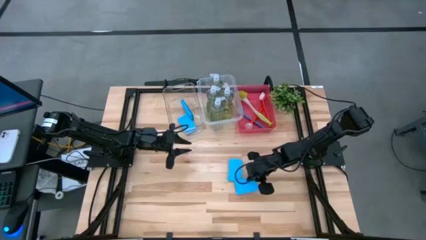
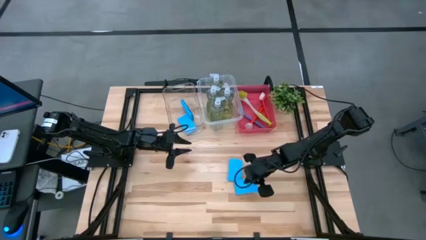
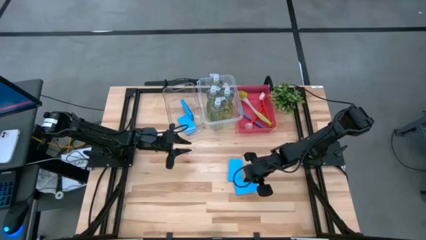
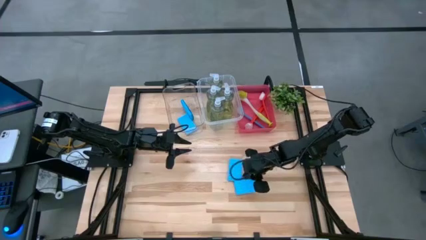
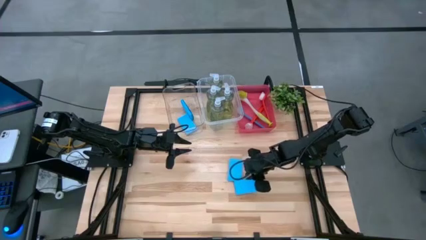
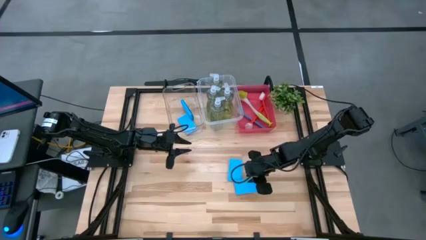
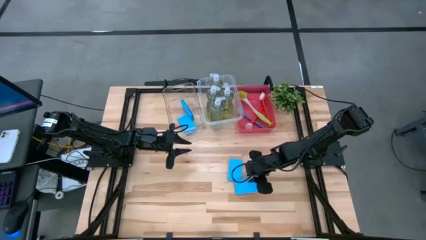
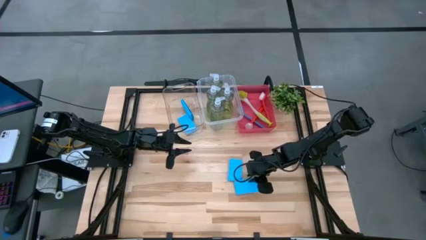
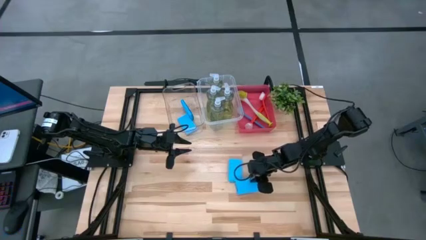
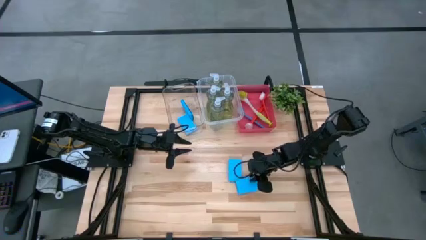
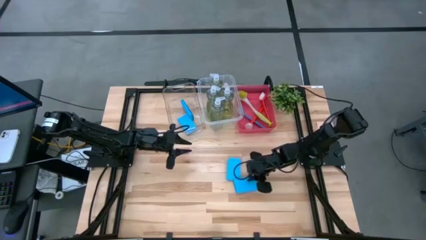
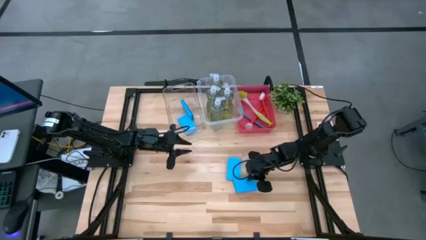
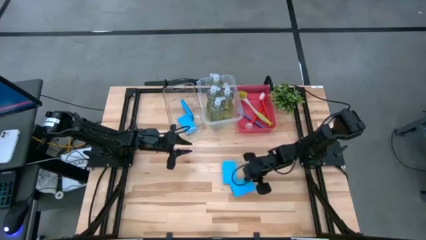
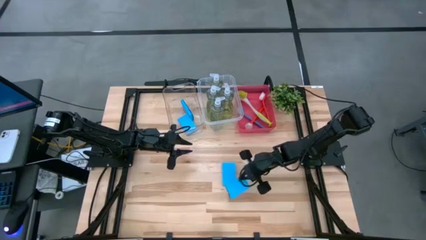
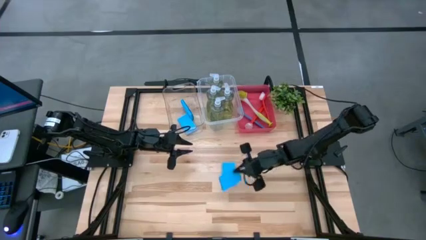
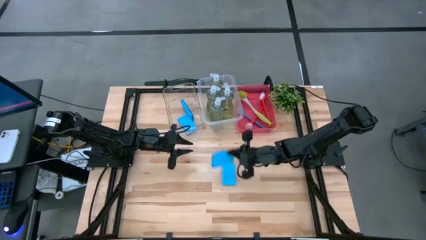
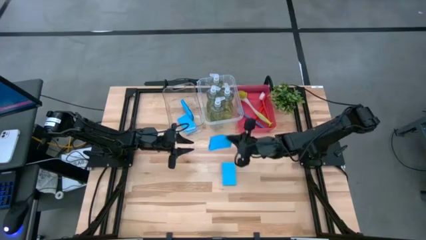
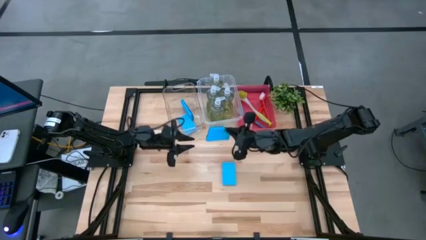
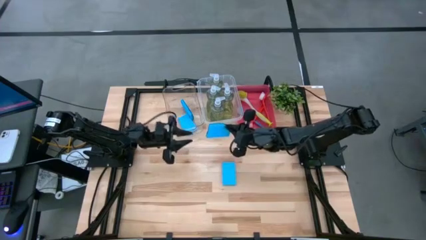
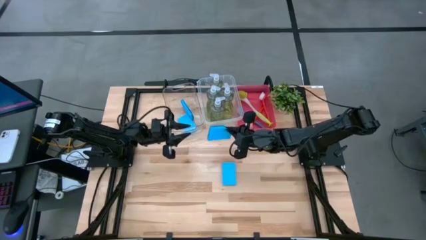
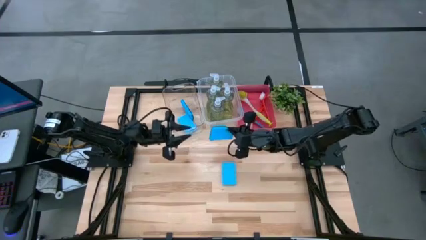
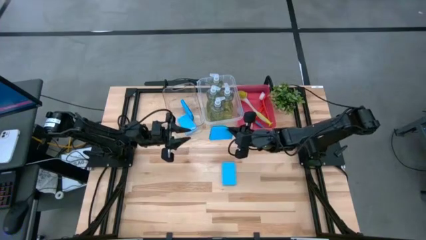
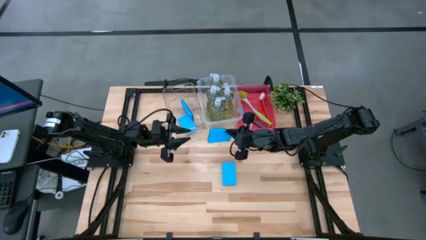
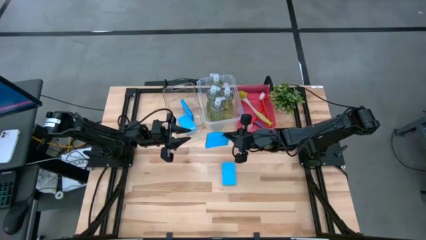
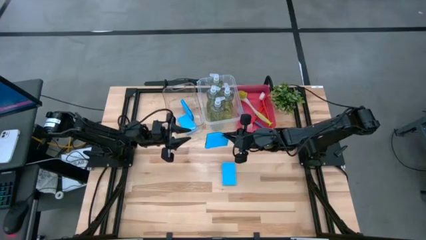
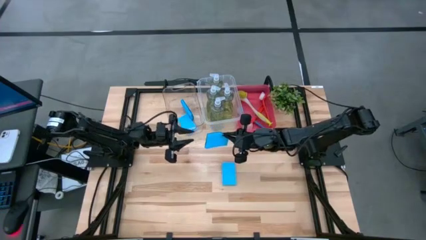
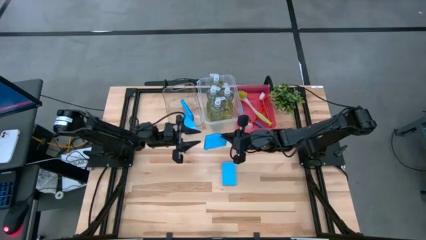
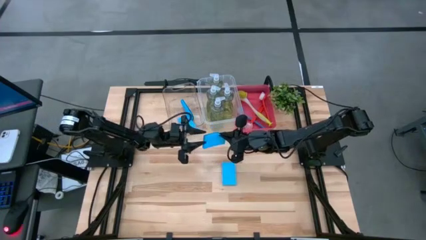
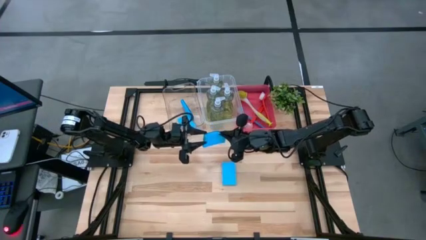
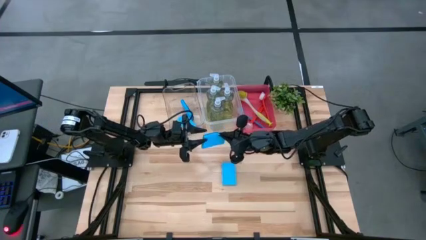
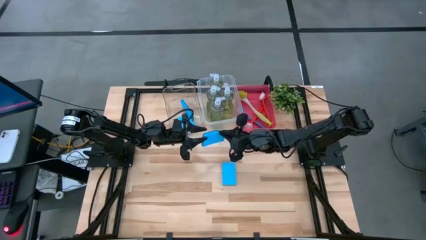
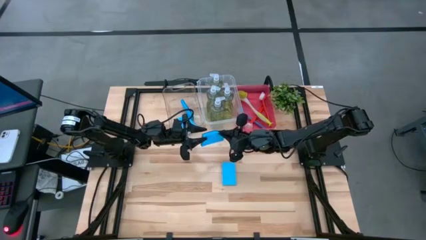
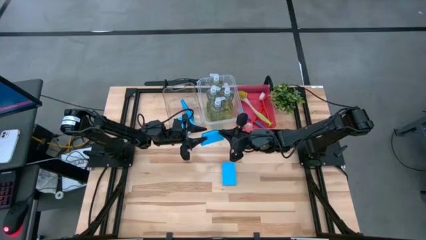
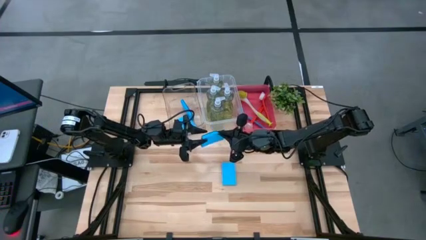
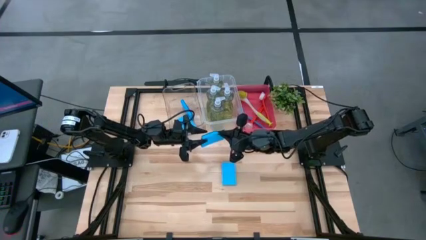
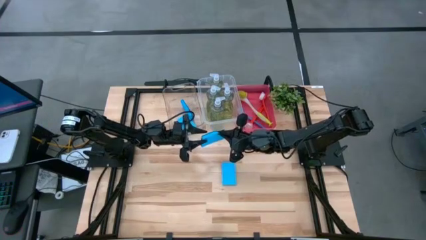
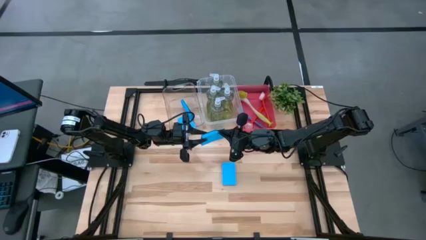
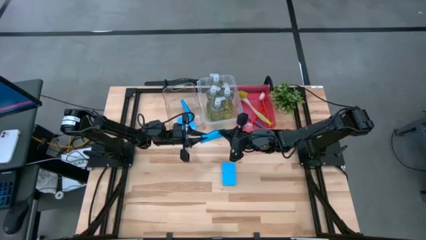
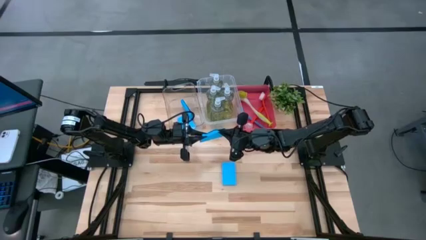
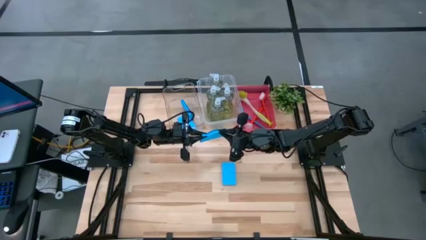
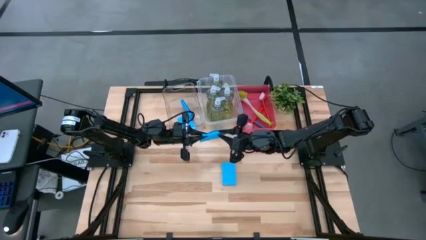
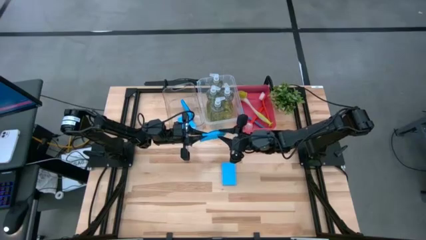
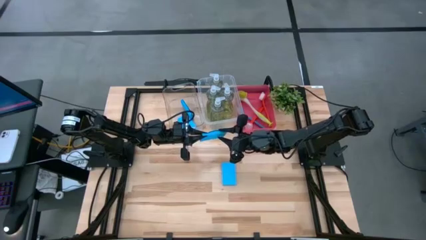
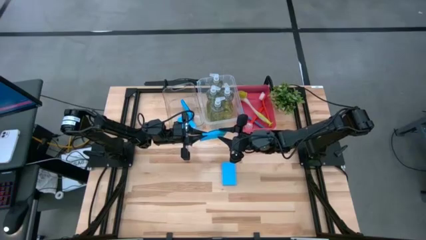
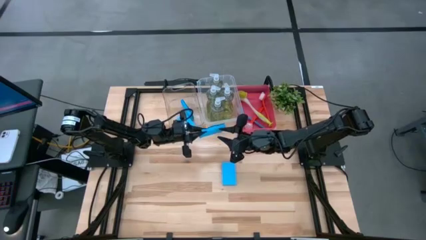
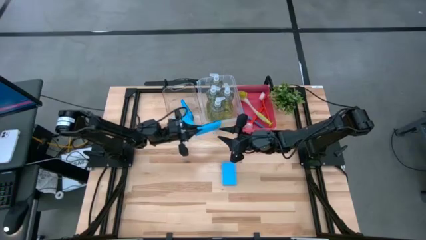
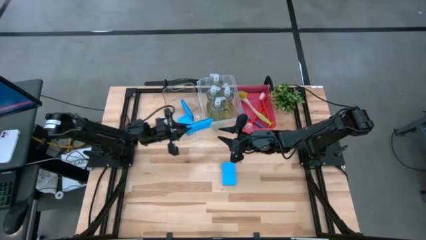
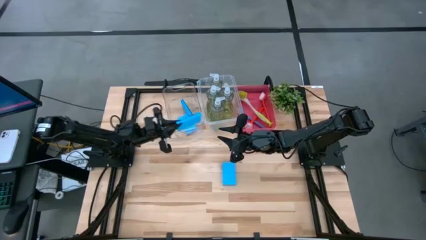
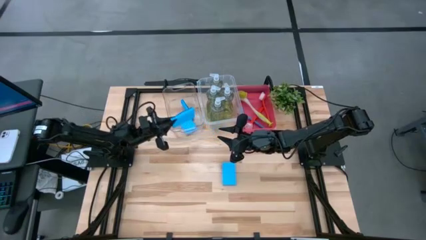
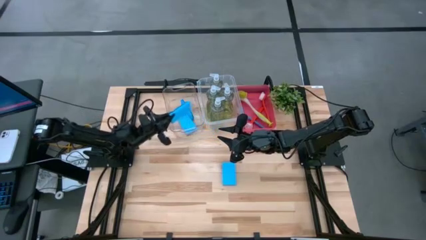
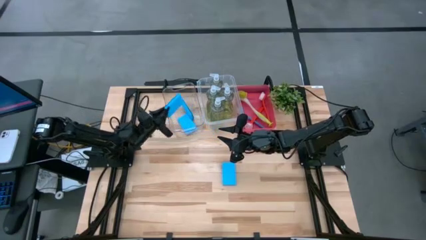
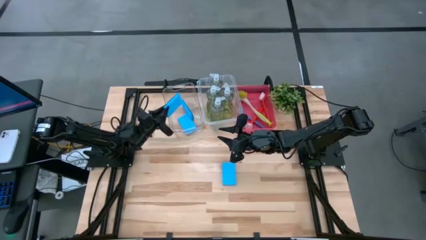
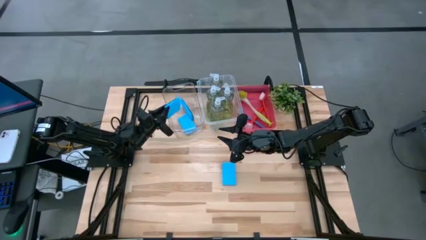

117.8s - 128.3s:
Task: Pick & Place Kitchen Sink Supplies
Put the blue sponge into the left transparent bin

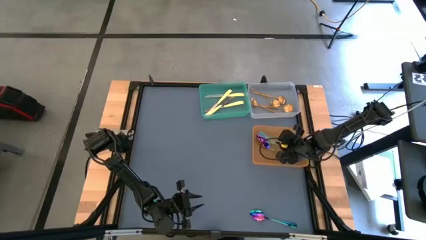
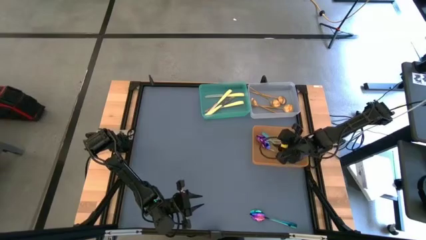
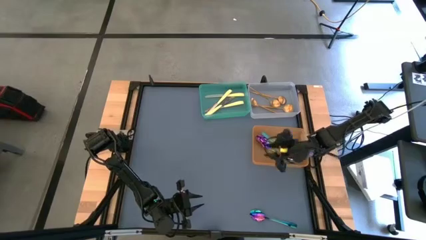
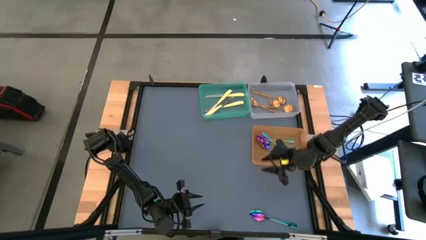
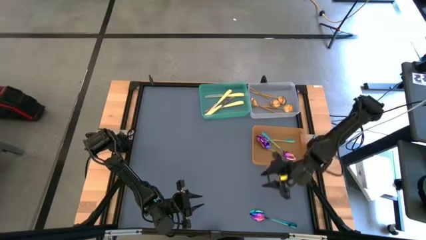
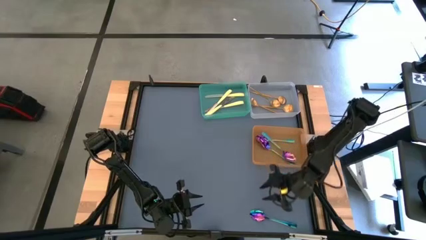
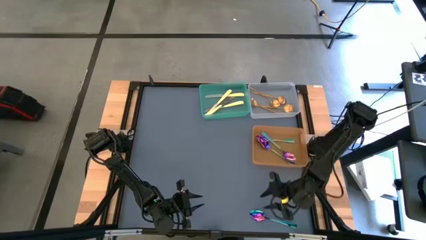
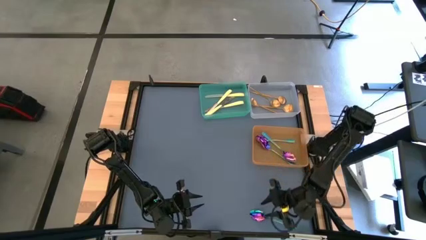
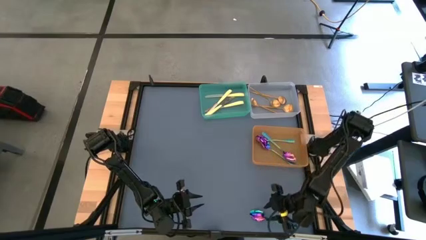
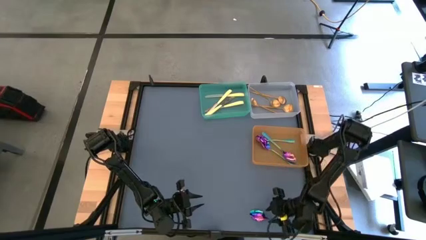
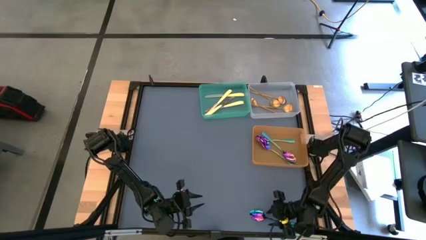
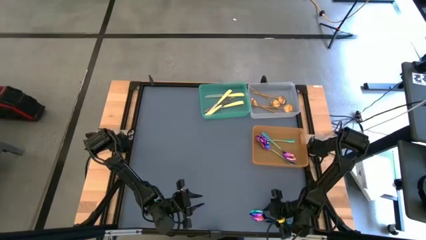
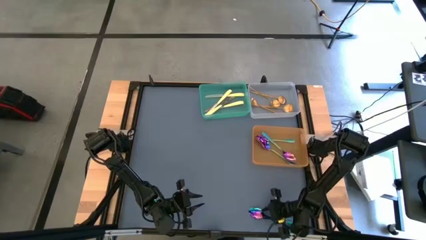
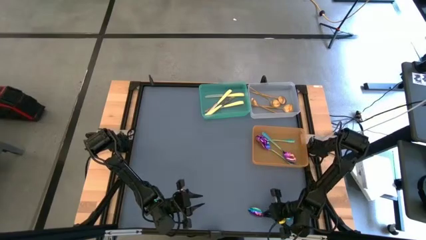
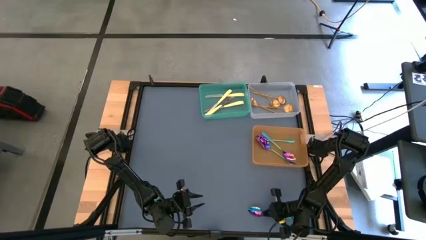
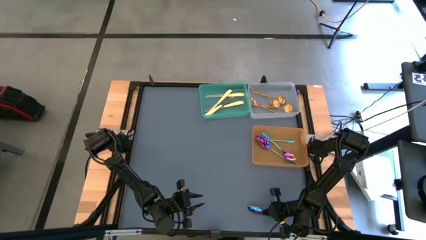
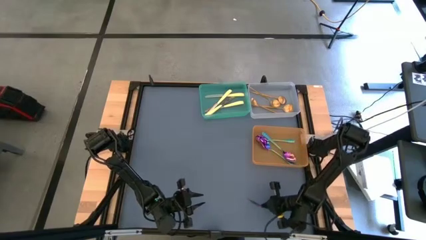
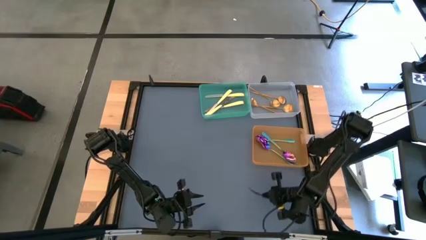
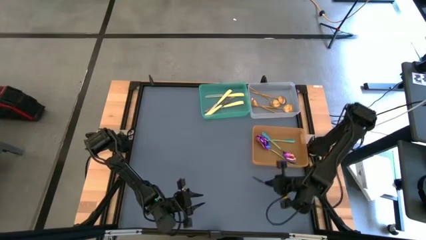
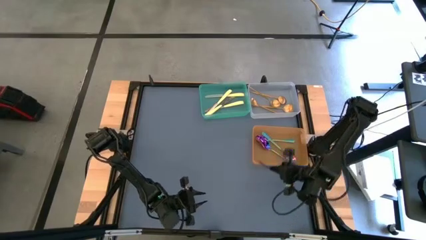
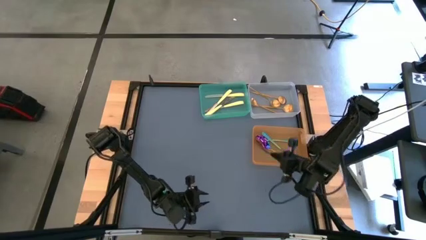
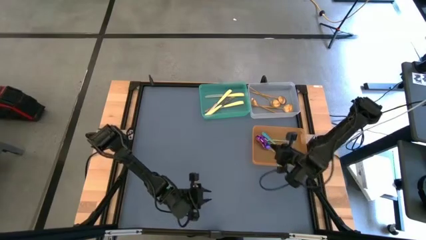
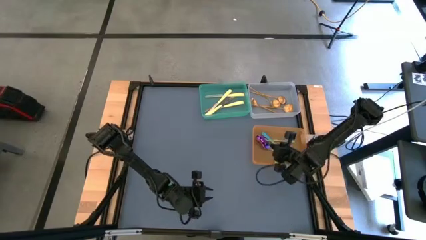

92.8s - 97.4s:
Task: Sort silverware by color (type)
Put the iridescent spoon into the orange bin

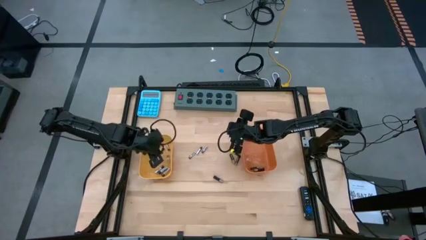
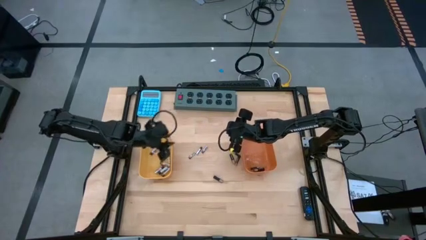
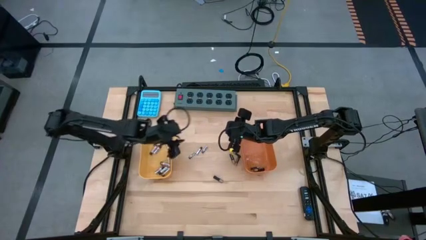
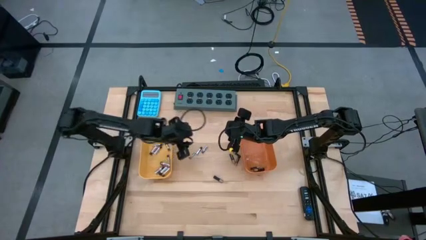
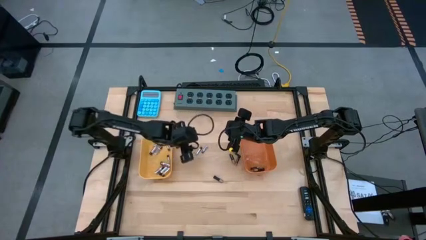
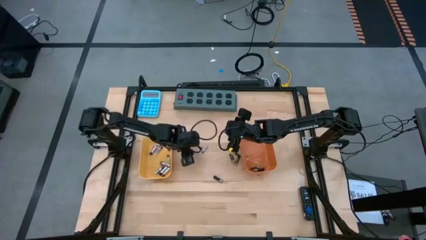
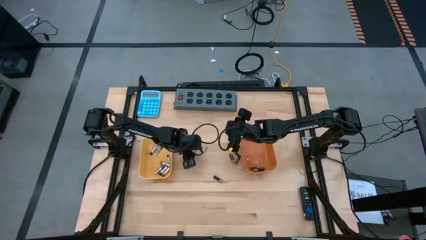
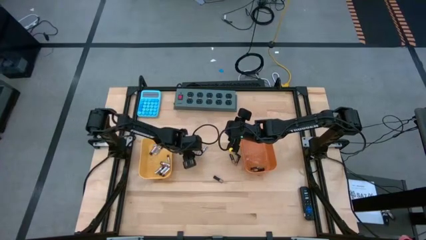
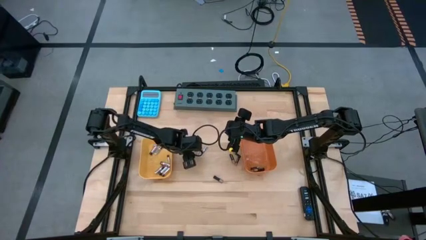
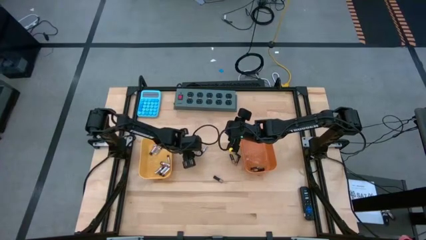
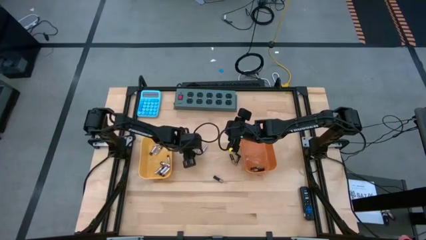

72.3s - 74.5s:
Task: Sort batteries
Put the silver battery into the yellow bin

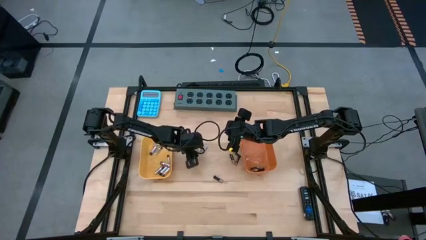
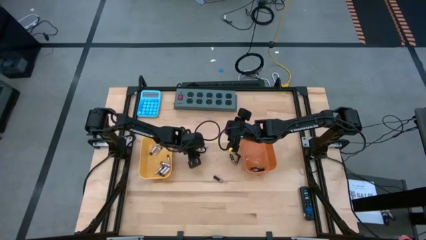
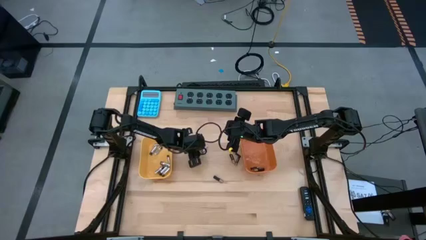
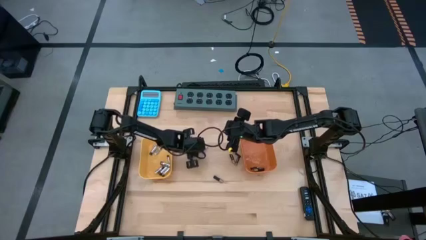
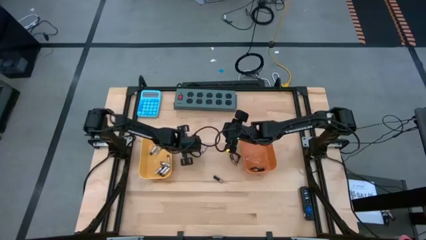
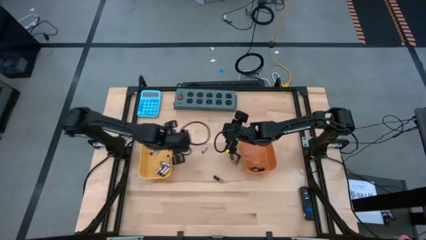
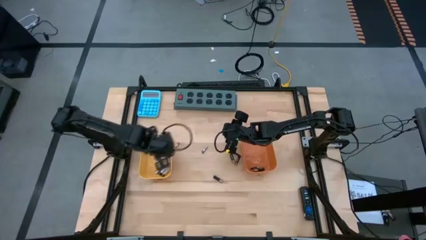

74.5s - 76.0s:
Put the silver battery into the yellow bin
